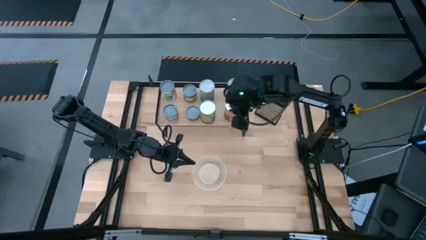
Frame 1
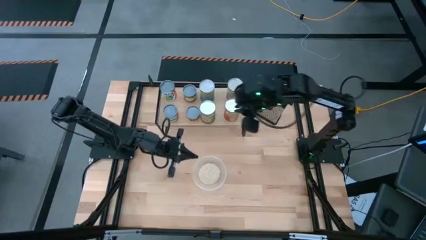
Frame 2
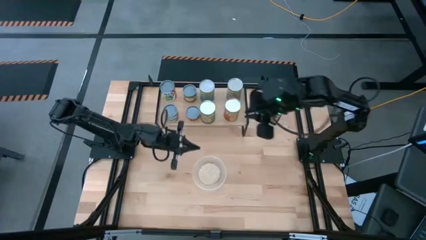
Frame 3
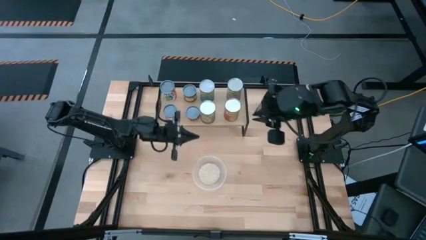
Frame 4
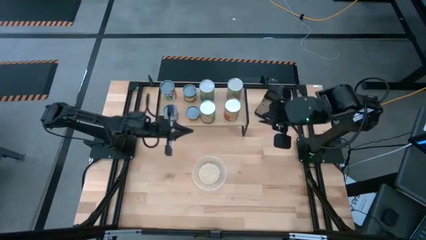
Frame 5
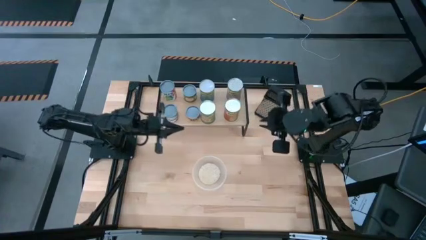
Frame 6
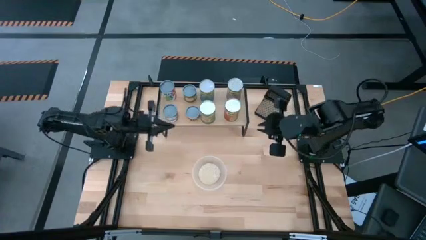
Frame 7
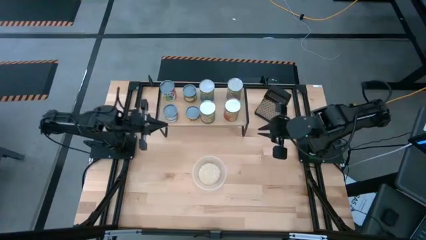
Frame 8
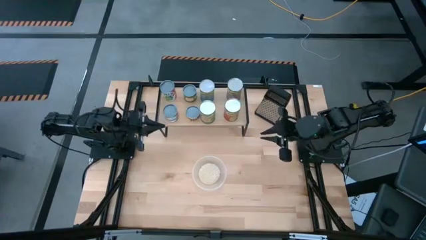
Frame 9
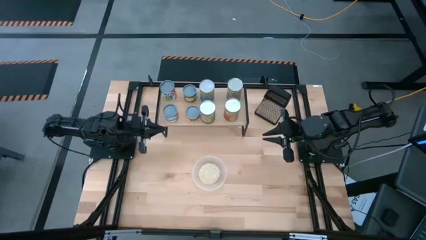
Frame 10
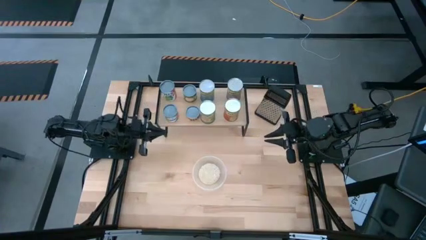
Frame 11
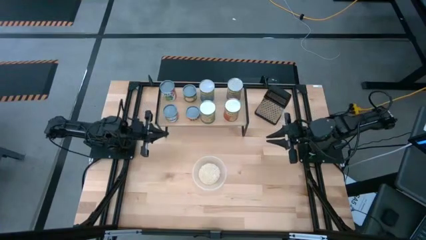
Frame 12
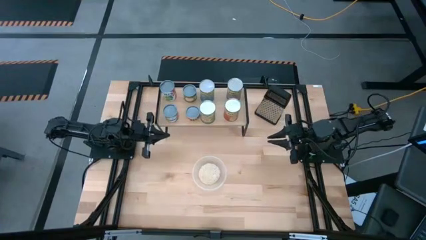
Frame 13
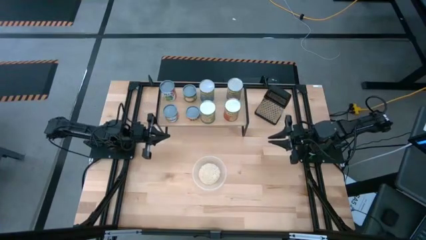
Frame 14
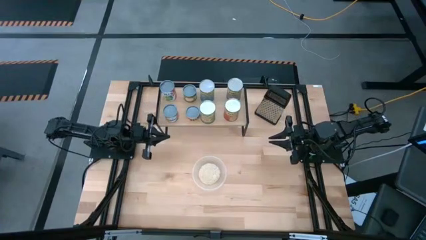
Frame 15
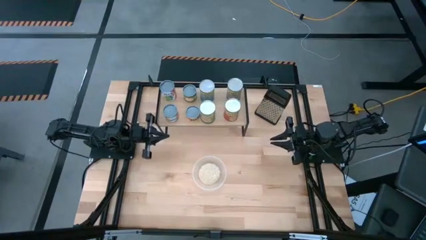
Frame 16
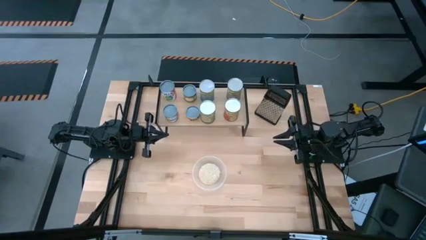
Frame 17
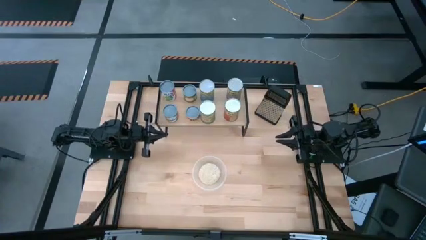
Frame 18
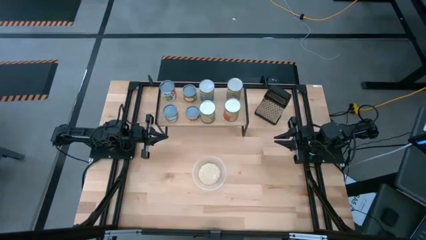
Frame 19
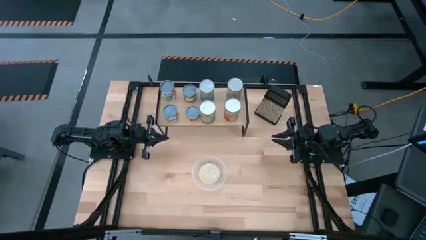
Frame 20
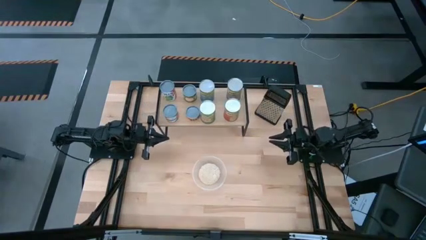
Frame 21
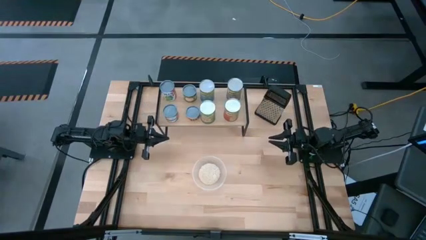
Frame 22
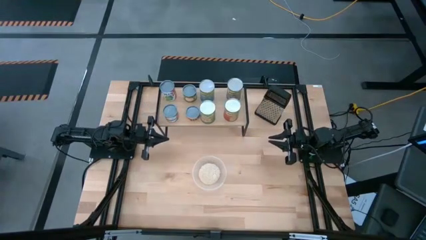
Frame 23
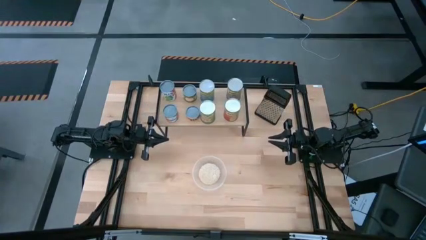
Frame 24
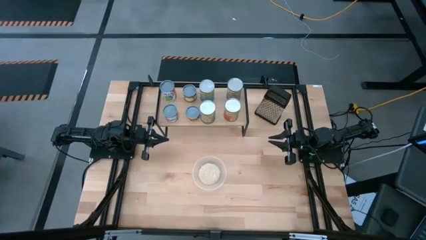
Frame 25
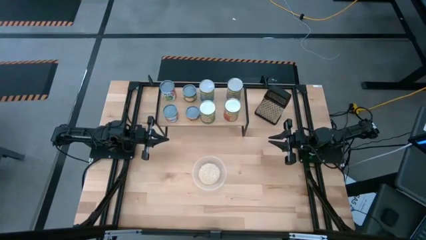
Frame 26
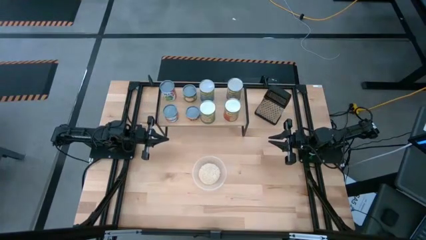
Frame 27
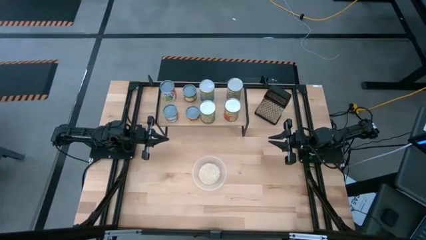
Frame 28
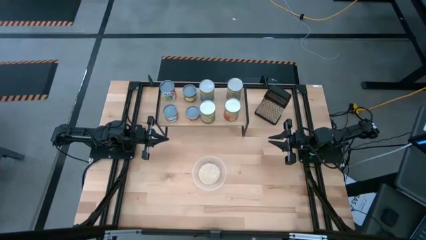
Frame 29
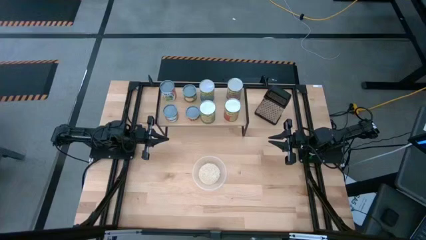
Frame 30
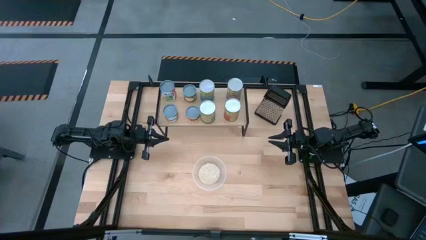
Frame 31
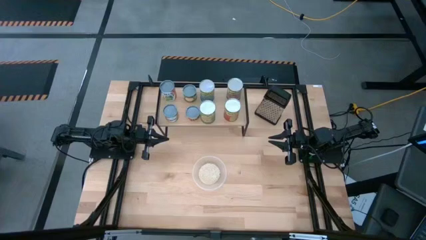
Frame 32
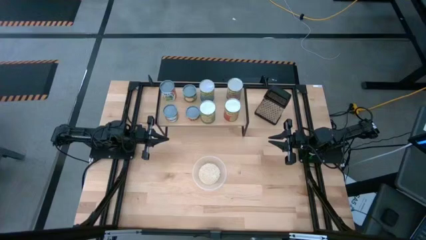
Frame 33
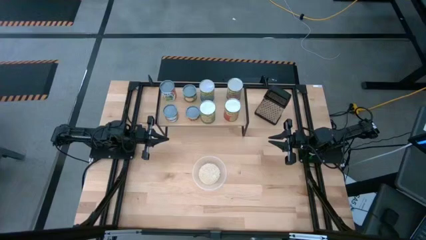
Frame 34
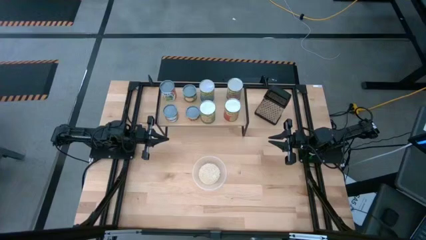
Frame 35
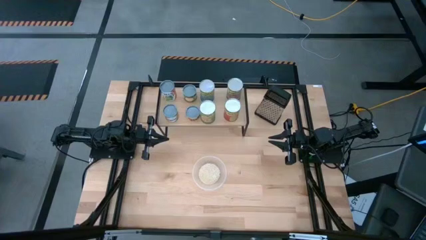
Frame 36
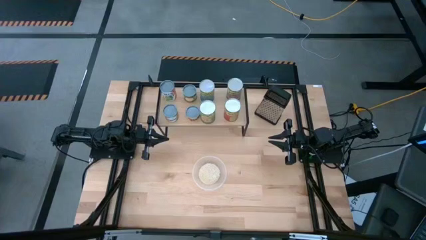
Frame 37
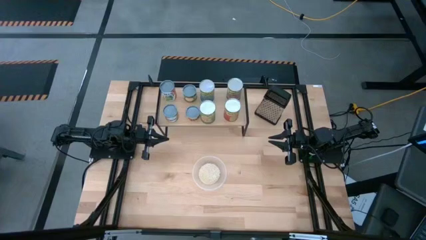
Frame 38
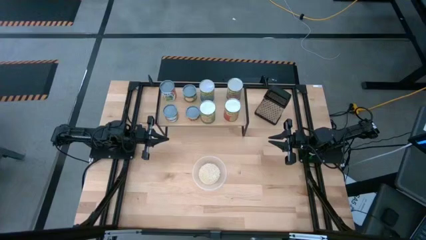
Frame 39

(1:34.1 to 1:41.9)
Task: Pick and place cans onto a shelf
Return to Home Position

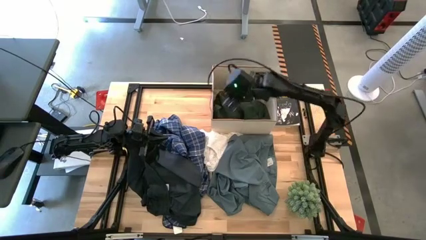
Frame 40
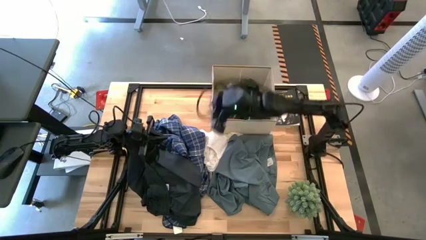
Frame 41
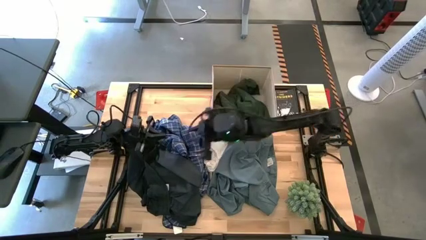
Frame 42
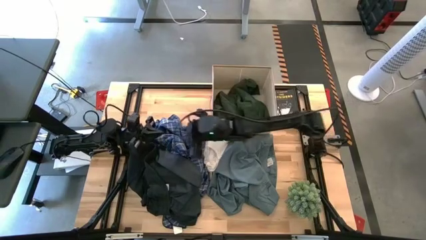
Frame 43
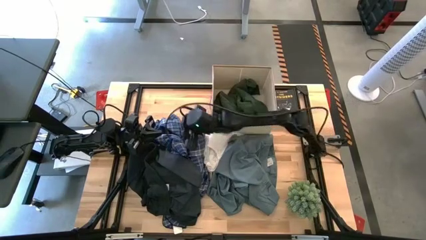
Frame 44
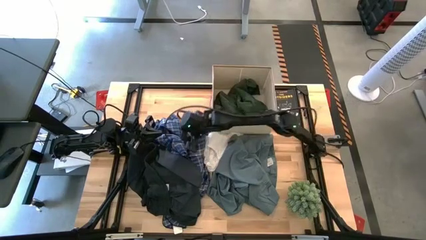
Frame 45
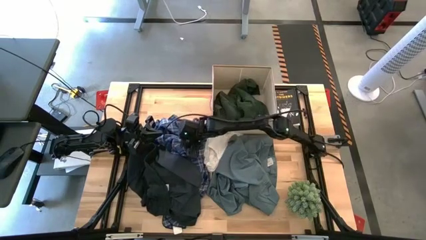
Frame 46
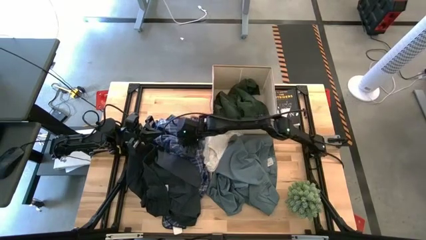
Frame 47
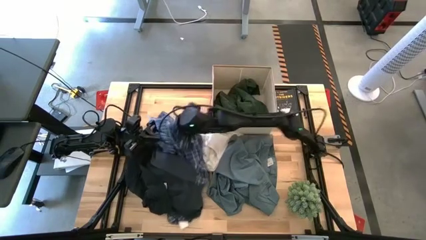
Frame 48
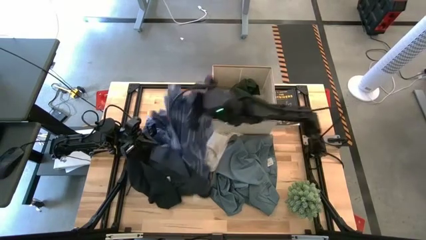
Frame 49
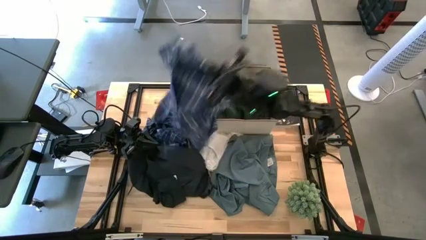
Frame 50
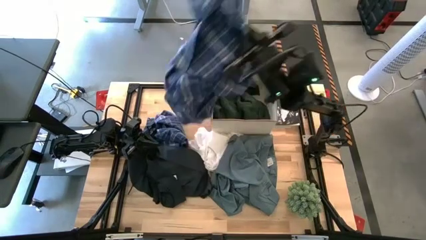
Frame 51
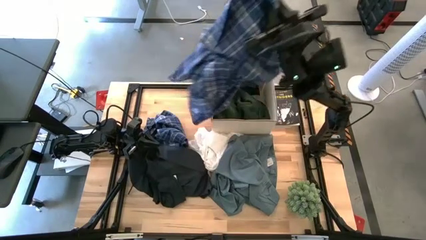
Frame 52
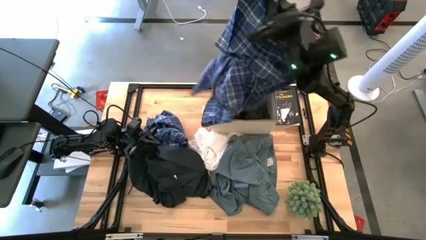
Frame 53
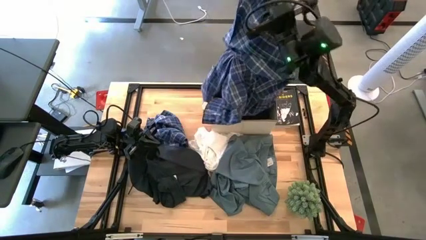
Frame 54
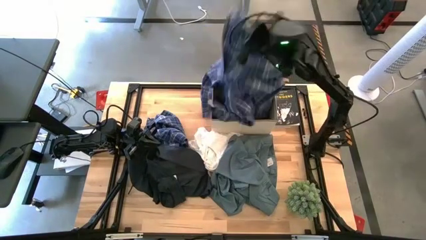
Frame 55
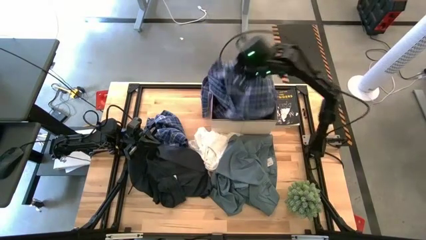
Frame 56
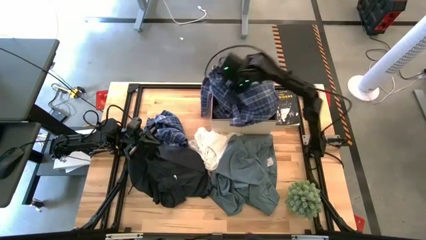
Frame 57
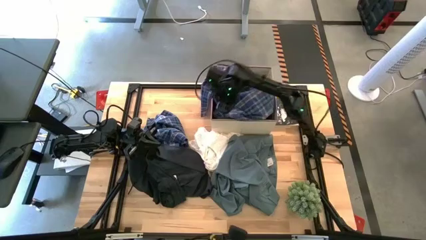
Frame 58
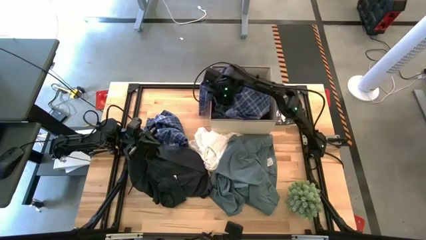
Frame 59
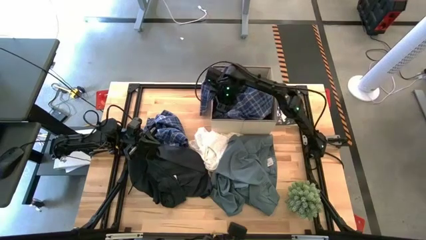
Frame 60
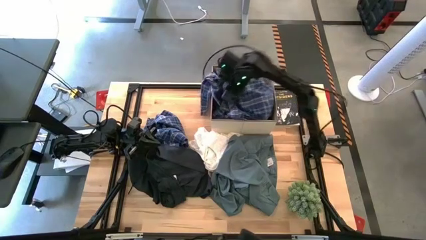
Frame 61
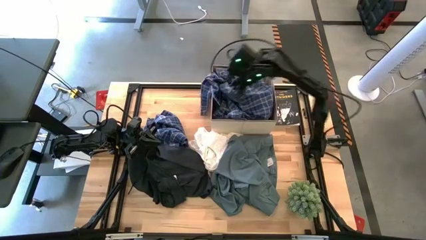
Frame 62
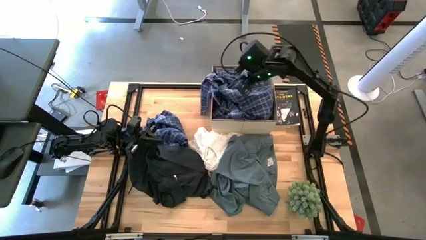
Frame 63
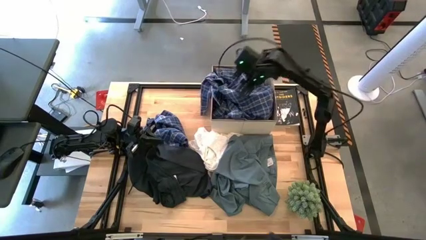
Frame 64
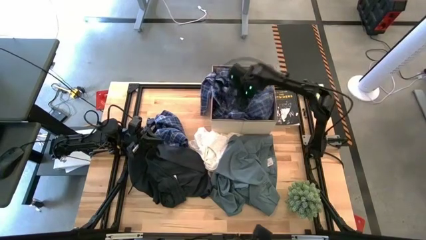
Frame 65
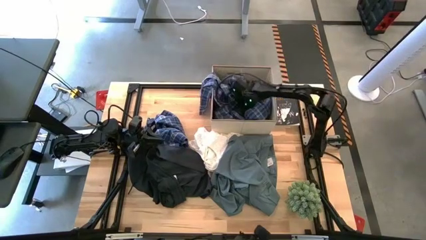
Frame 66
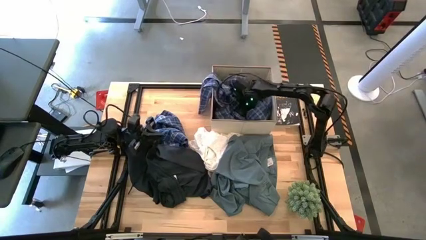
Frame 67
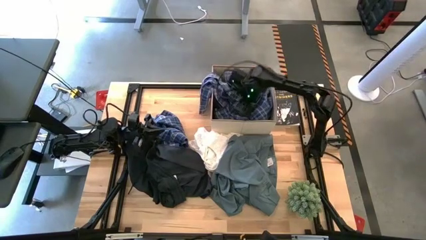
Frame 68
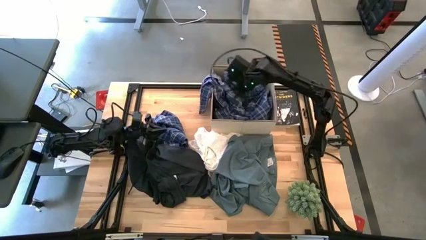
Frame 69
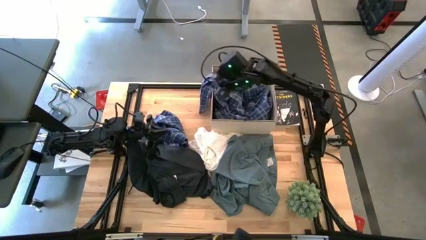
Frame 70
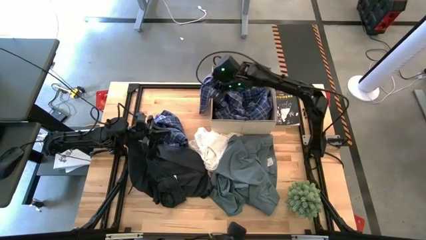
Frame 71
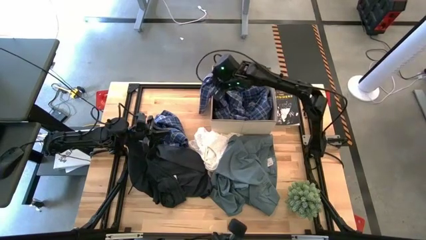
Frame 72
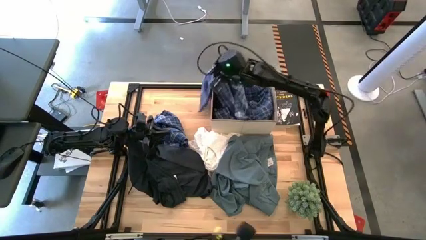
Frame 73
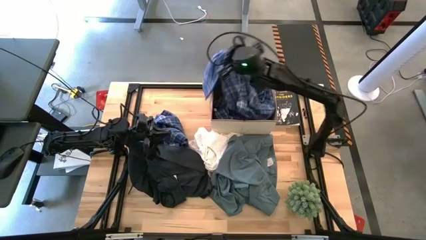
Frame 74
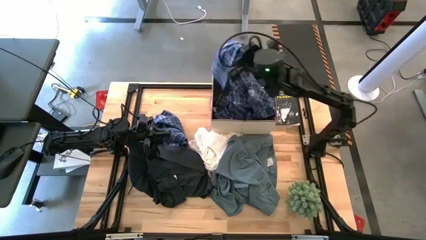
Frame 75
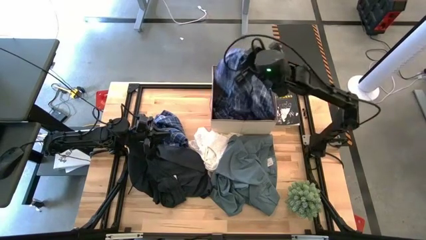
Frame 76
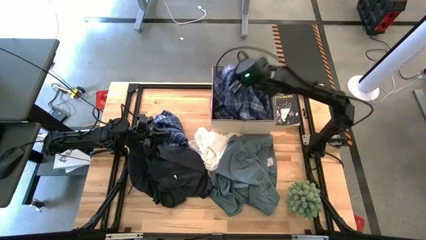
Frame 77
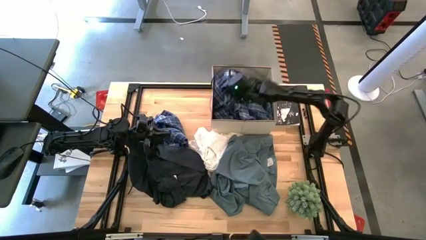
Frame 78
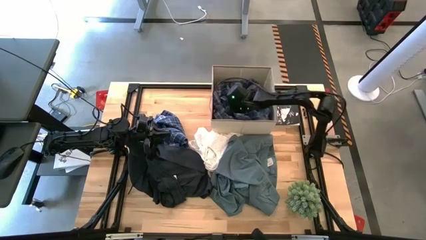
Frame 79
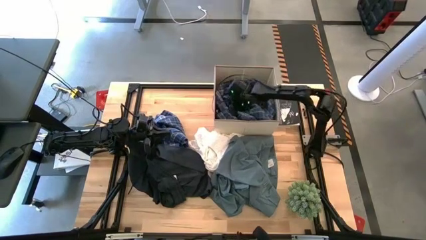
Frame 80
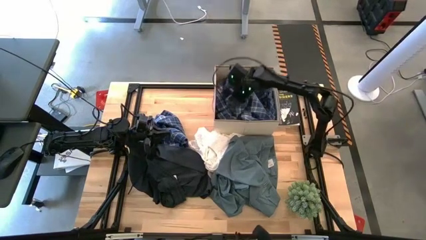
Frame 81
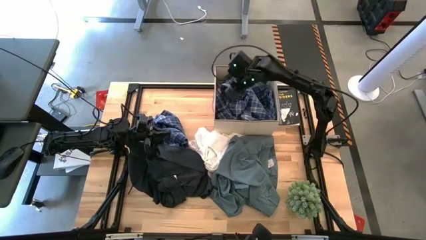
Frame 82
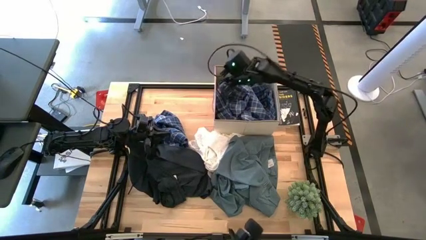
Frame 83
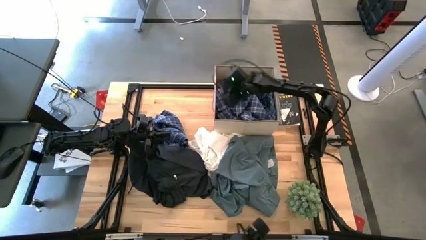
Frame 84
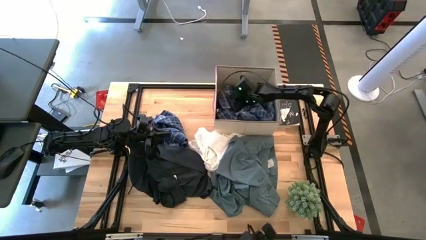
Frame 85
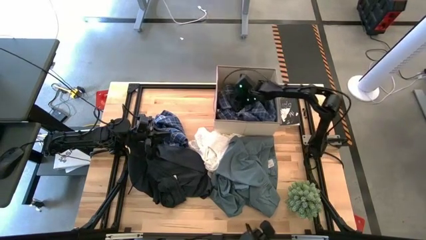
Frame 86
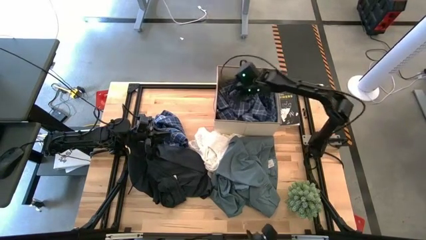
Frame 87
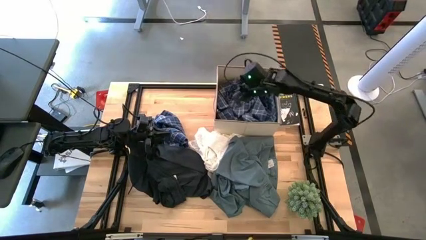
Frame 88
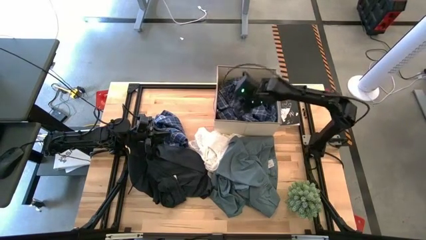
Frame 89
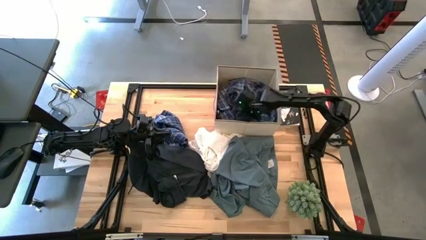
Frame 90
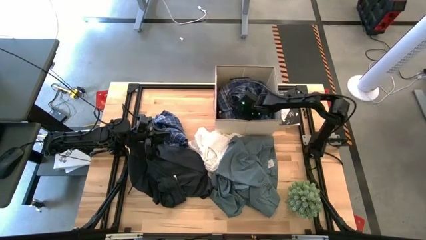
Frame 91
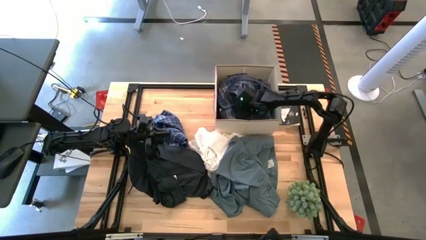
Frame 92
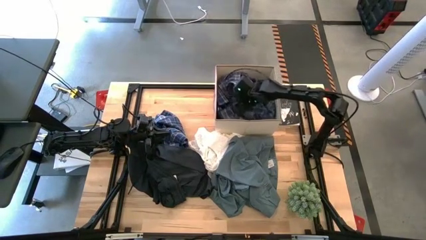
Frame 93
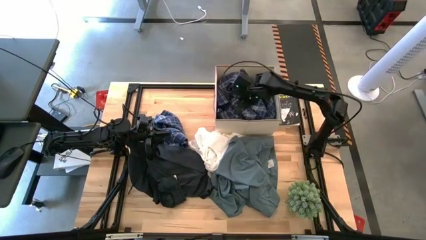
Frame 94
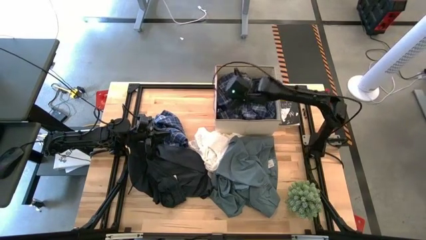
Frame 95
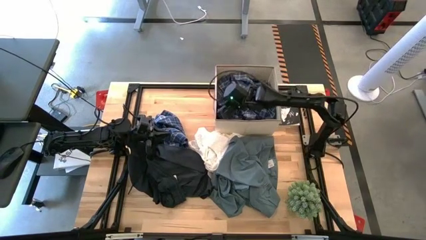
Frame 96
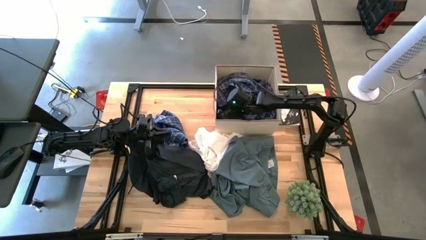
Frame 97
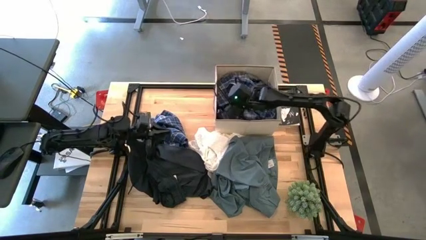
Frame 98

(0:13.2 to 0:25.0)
Task: Sort clothes
Put the right blue patterned sleeve into the laundry organizer
